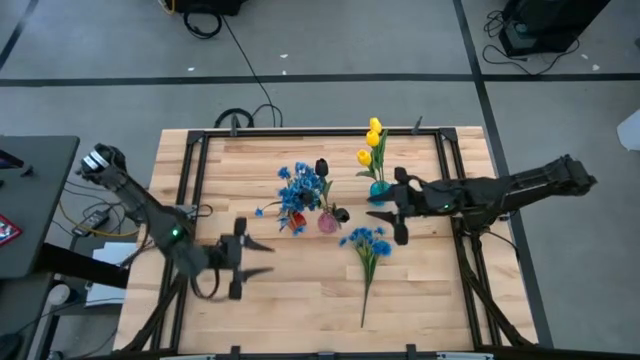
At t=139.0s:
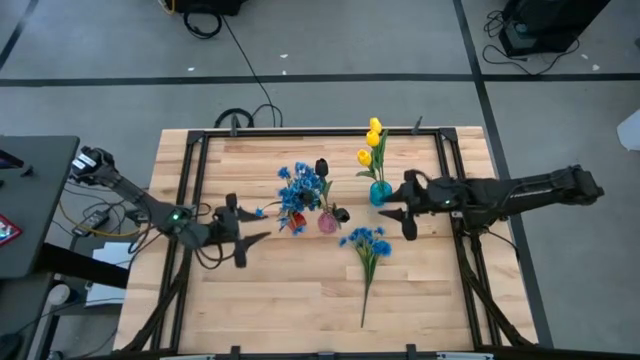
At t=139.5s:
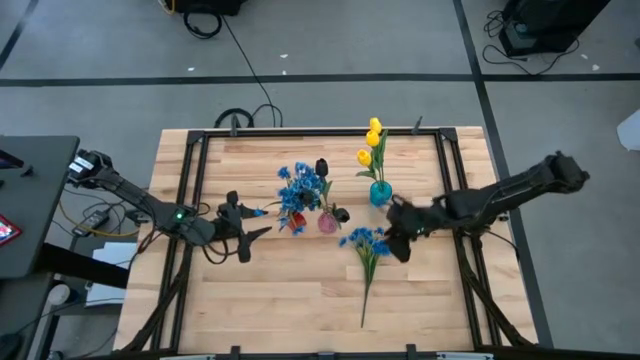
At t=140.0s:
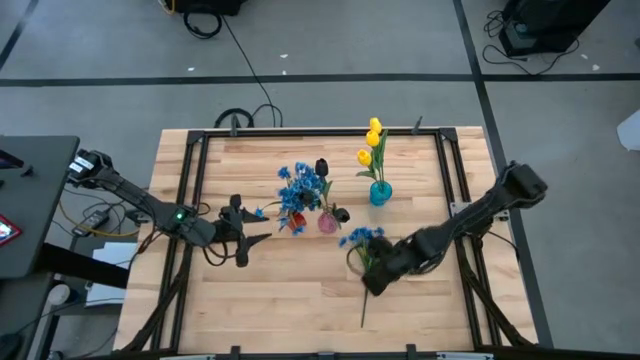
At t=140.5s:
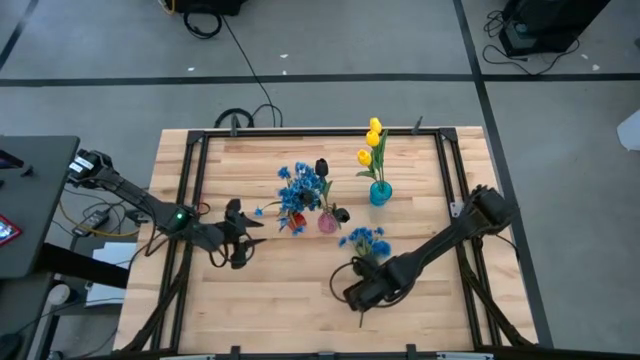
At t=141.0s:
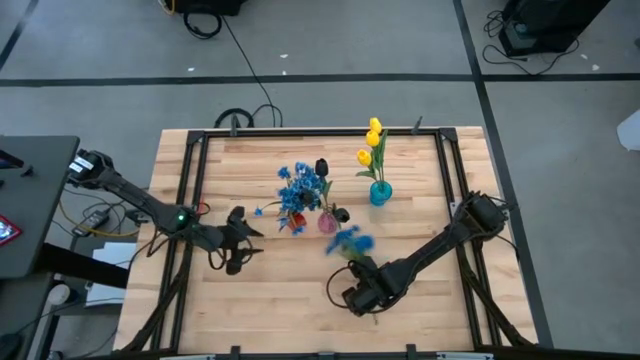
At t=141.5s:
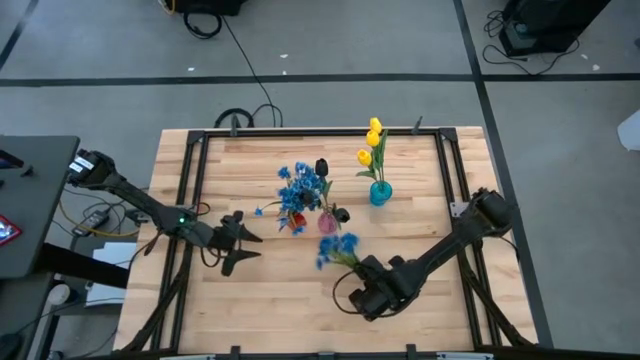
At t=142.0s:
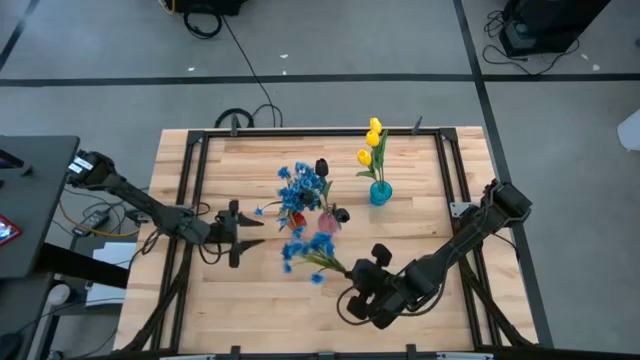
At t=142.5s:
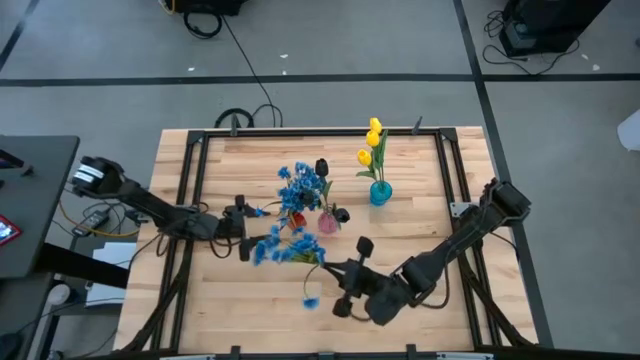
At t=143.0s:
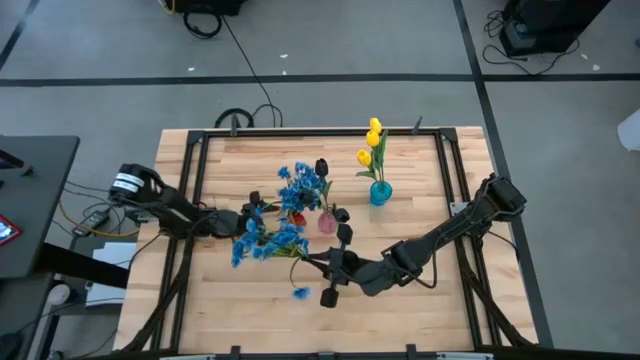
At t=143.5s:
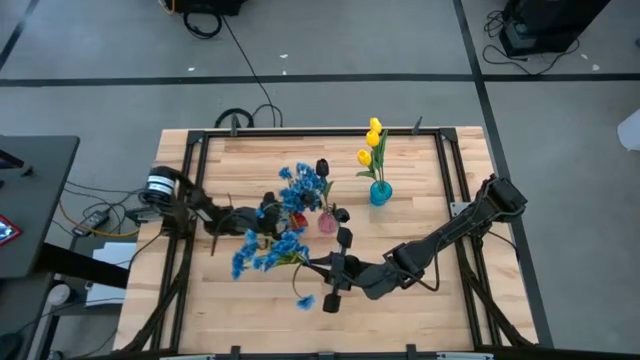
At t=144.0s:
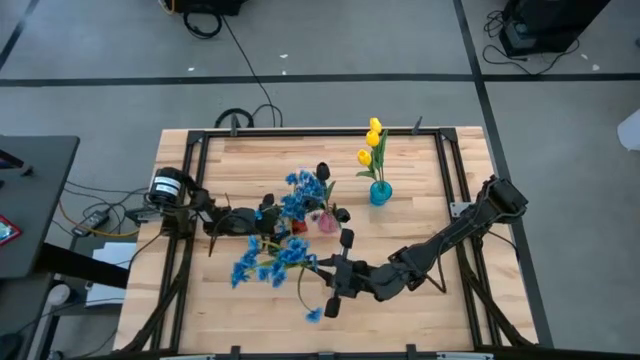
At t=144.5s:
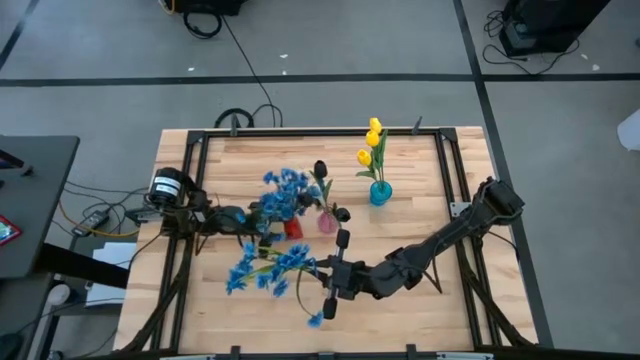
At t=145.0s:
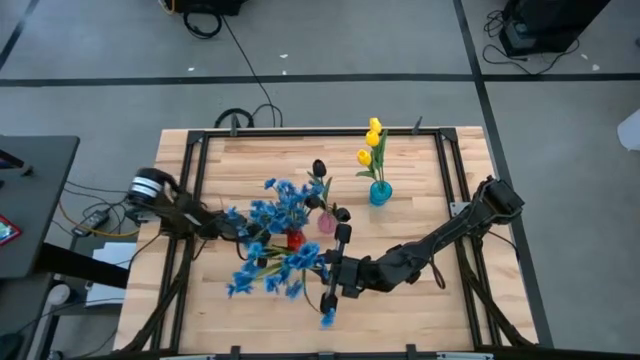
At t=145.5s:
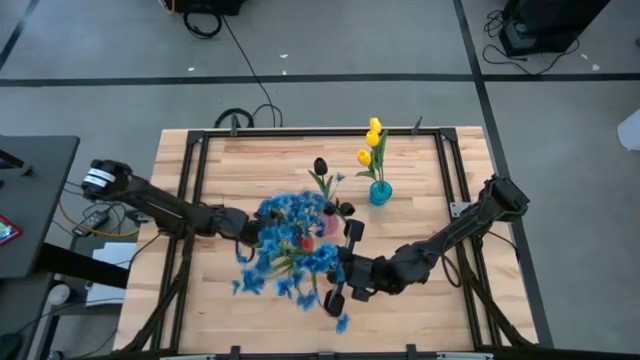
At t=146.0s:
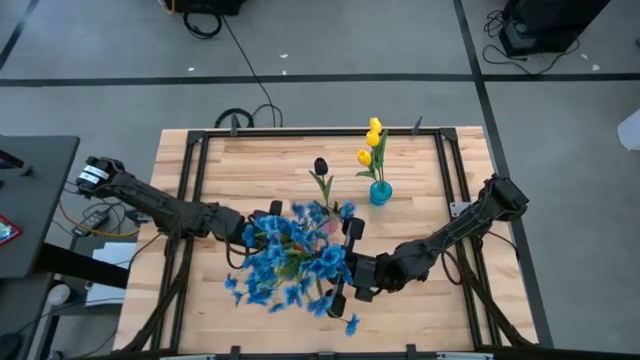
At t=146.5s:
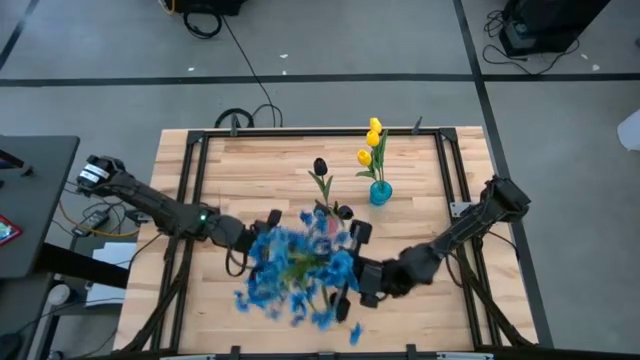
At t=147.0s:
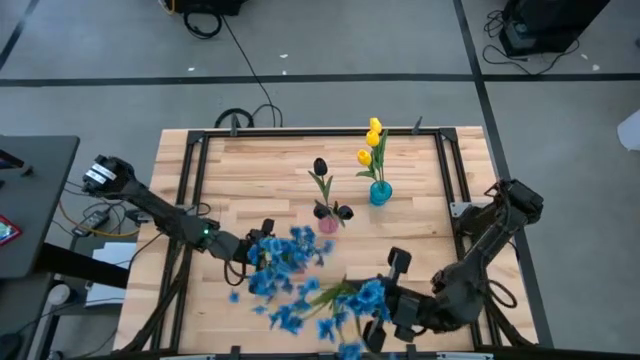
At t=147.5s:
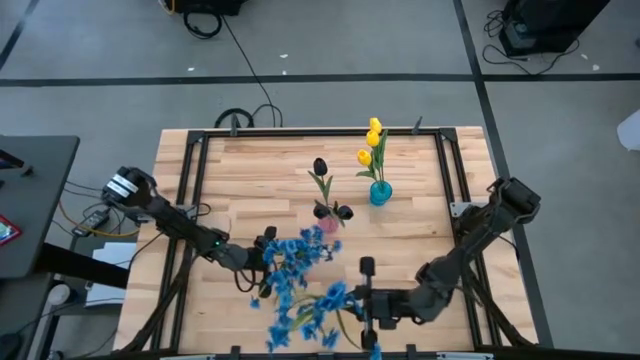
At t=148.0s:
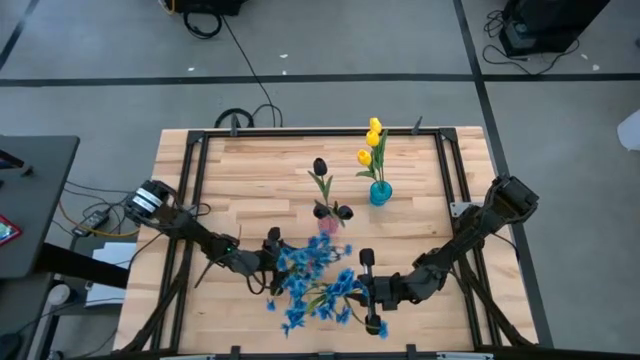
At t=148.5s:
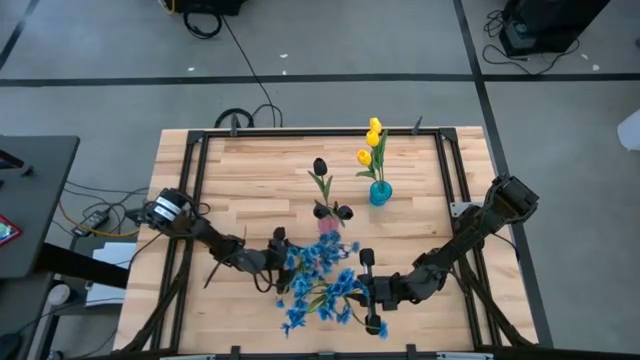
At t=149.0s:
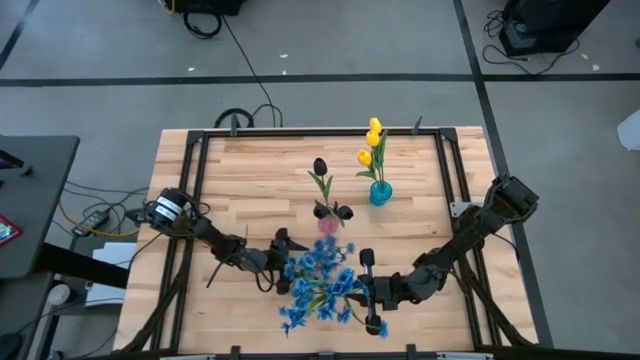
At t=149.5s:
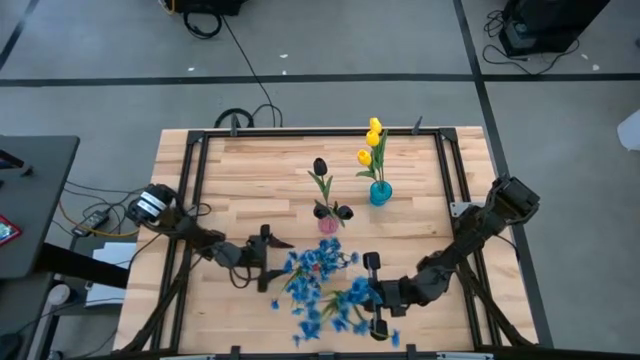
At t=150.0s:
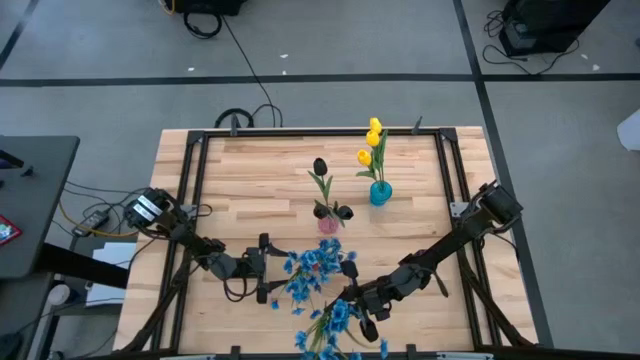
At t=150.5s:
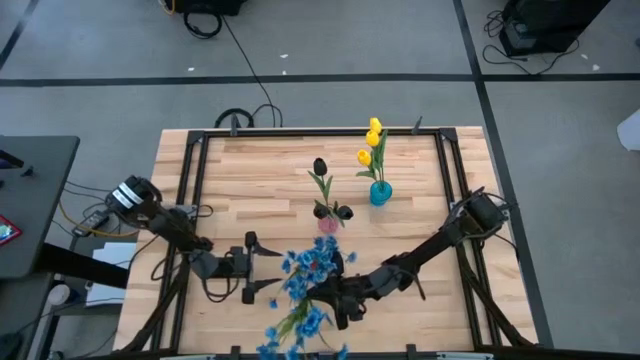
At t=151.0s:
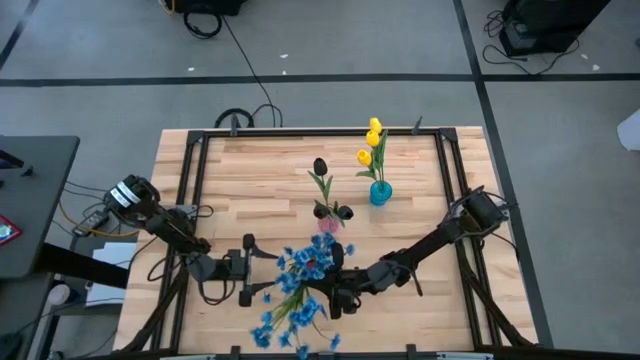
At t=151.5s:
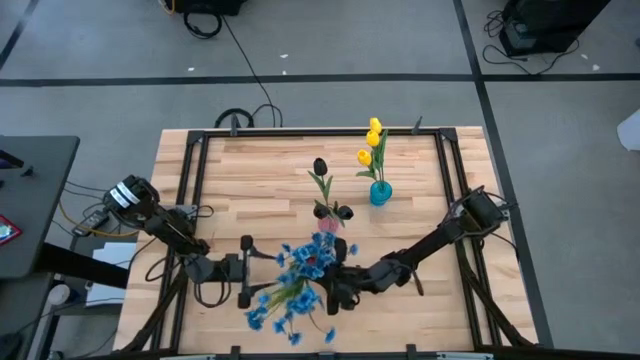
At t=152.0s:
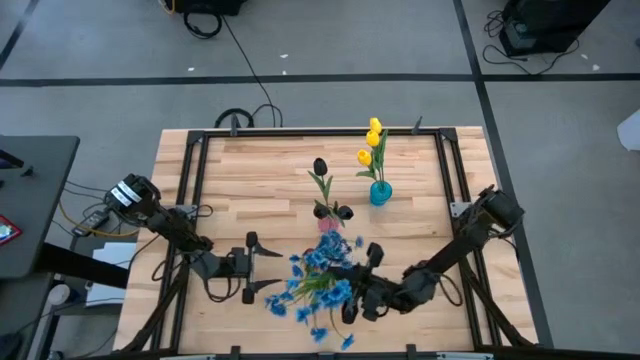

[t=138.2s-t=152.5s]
Task: Sort flowers into vase by color
Put the blue flower into the red vase

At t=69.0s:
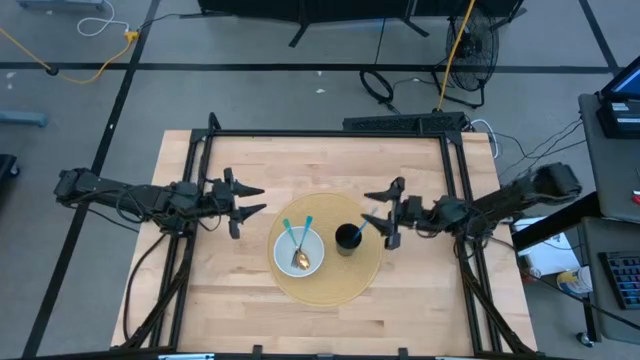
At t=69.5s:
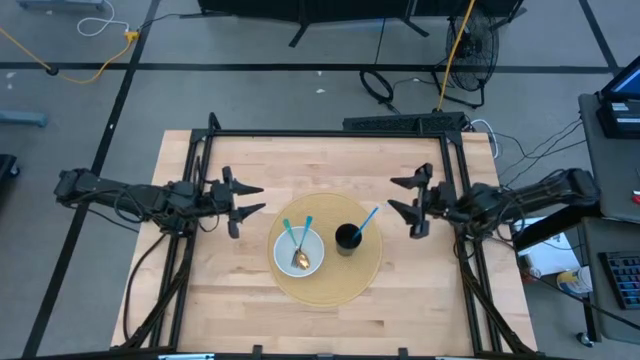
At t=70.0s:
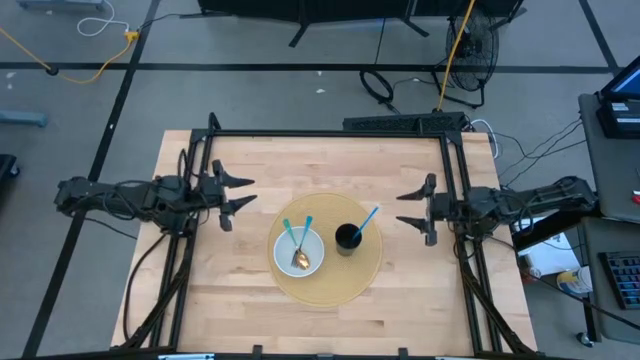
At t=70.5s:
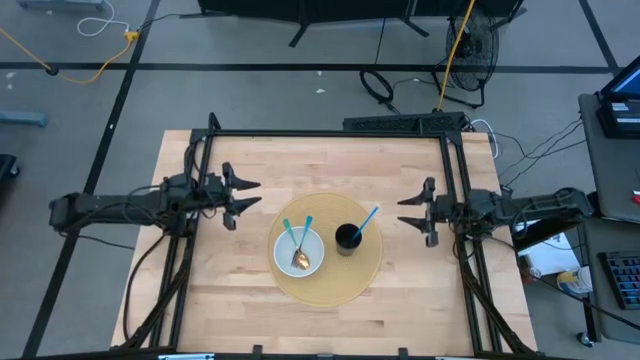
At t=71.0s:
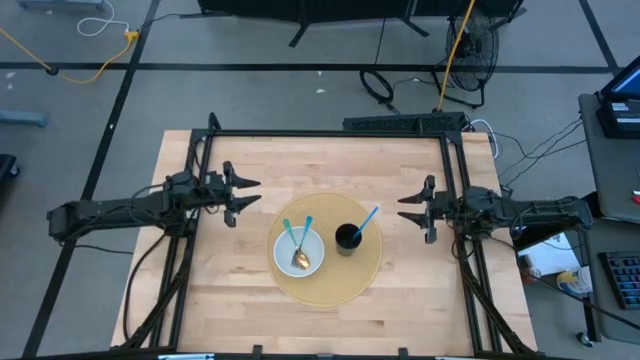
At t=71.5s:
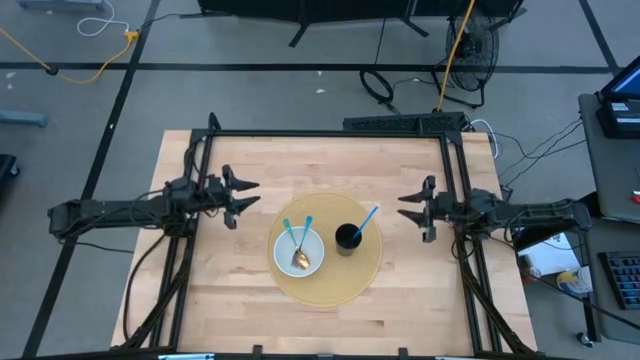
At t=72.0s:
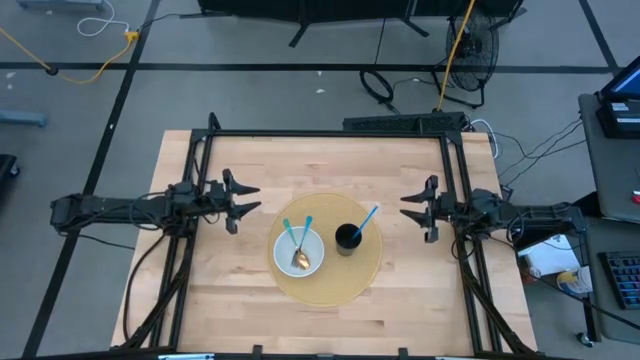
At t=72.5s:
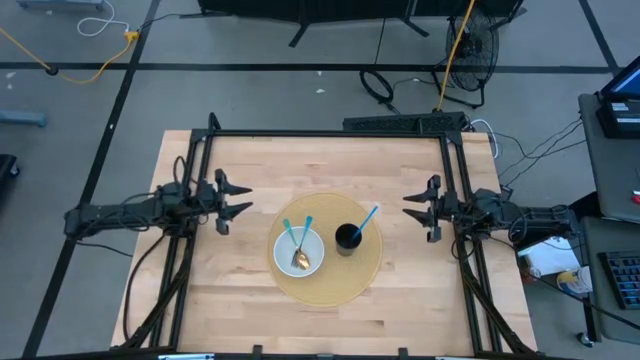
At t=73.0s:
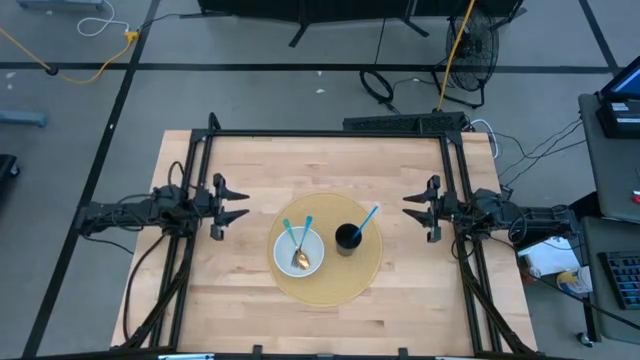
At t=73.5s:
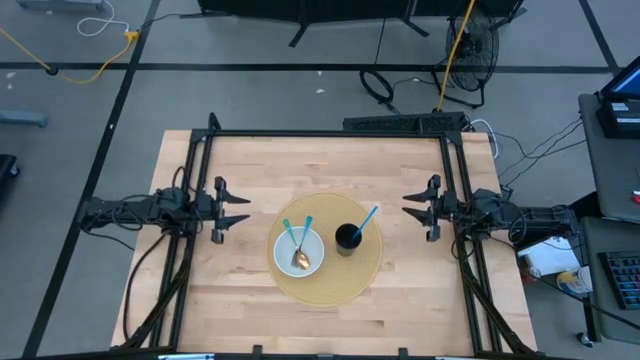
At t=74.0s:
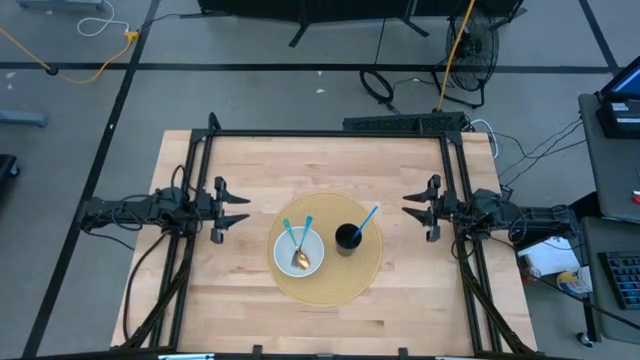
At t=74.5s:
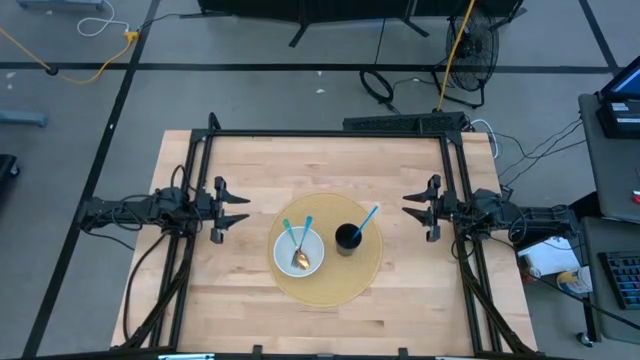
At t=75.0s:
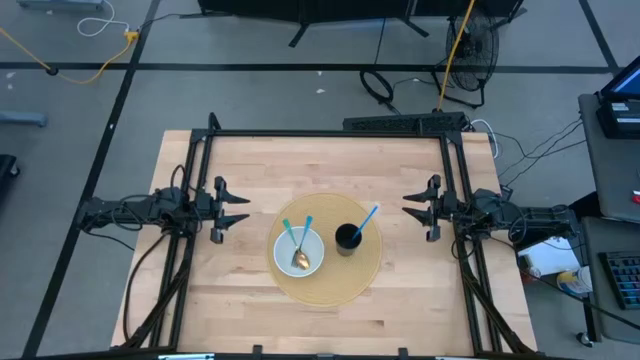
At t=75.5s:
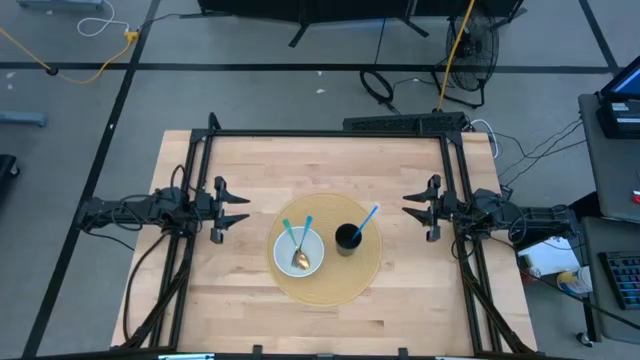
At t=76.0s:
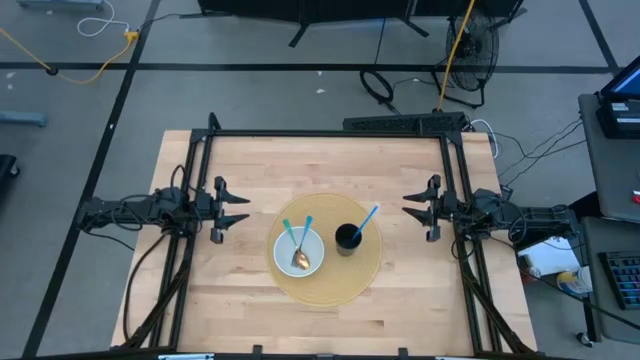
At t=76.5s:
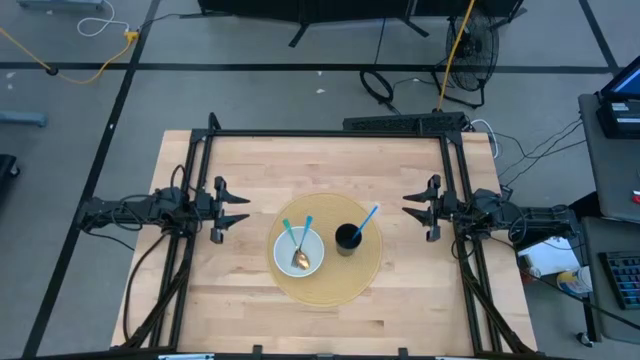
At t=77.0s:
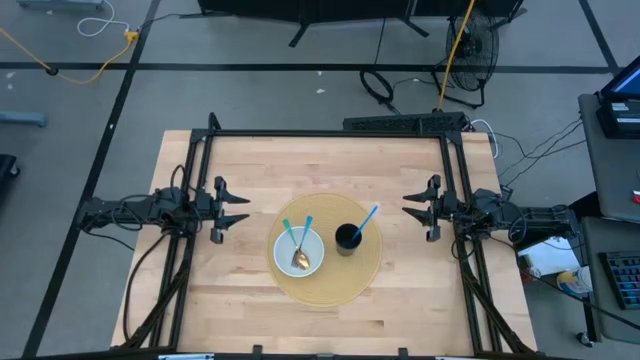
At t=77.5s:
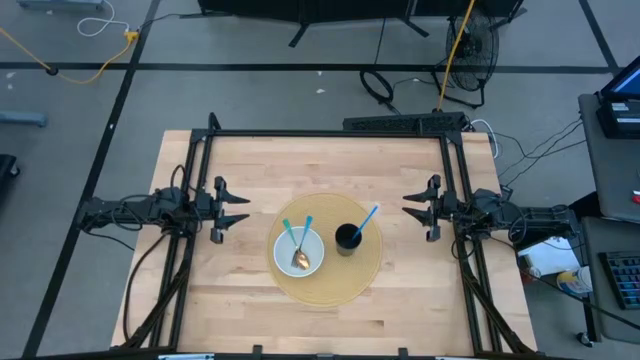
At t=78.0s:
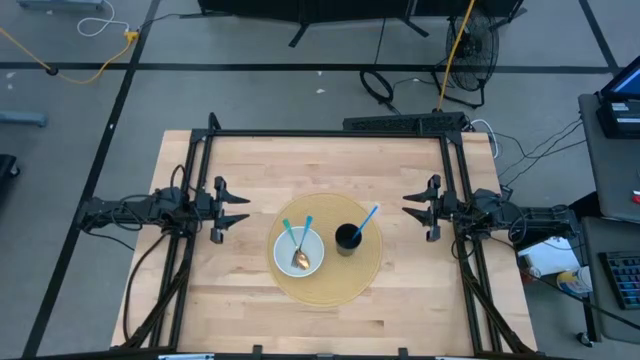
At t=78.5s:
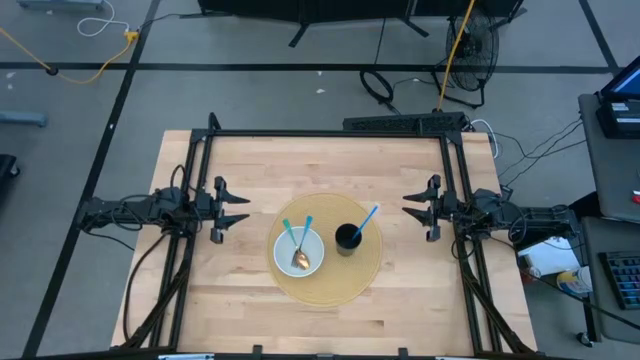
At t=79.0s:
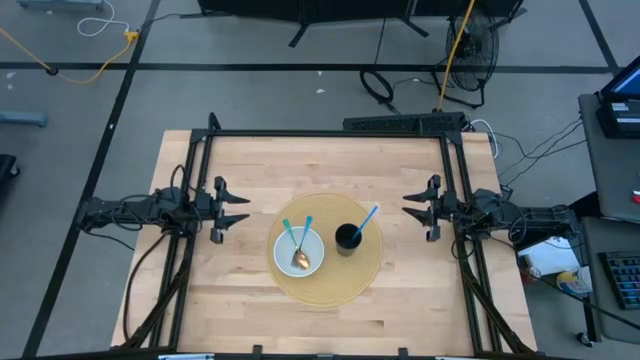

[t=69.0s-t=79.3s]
Task: Pick & Place Utensil
Return to Home Position
